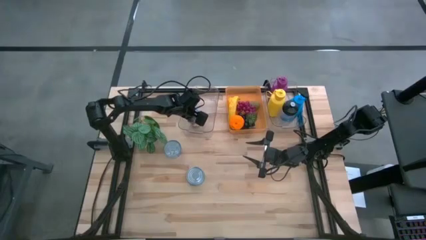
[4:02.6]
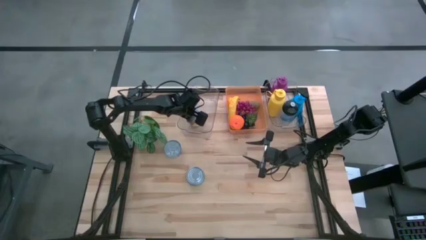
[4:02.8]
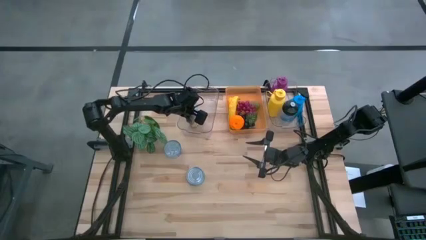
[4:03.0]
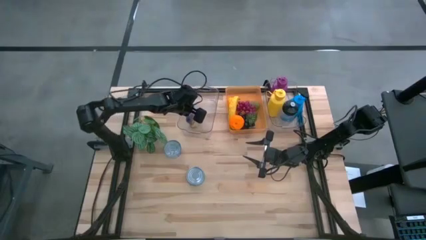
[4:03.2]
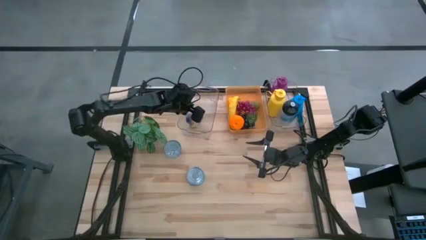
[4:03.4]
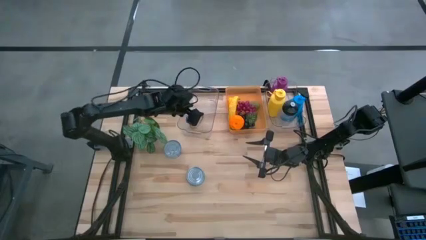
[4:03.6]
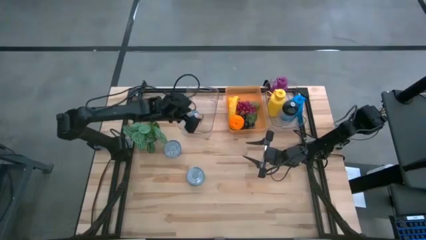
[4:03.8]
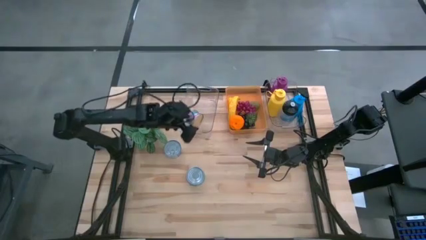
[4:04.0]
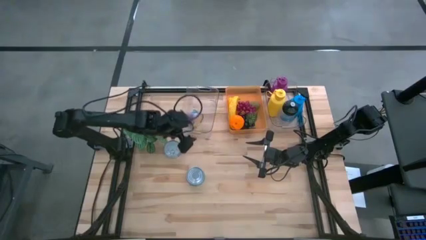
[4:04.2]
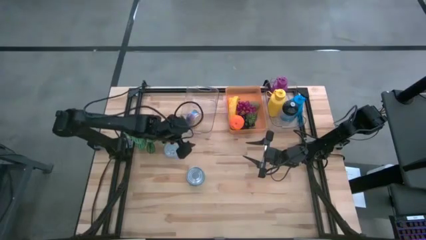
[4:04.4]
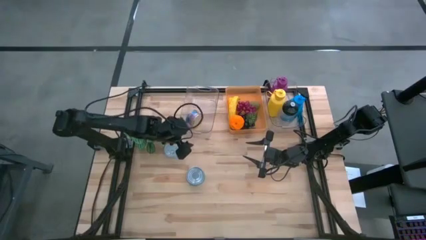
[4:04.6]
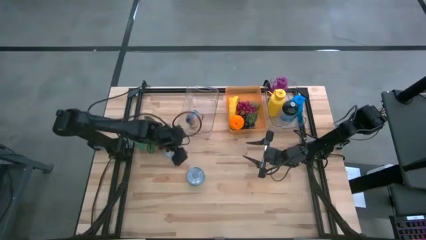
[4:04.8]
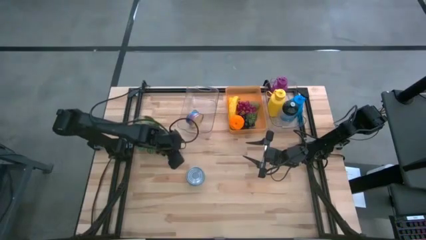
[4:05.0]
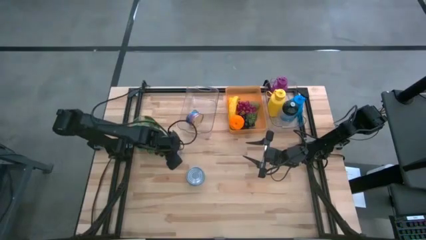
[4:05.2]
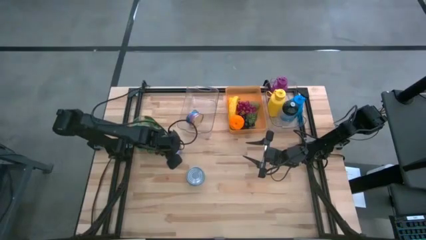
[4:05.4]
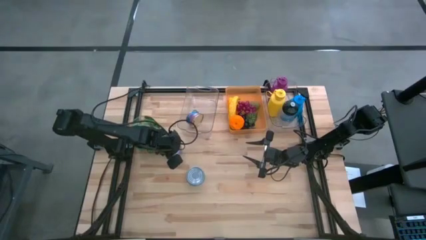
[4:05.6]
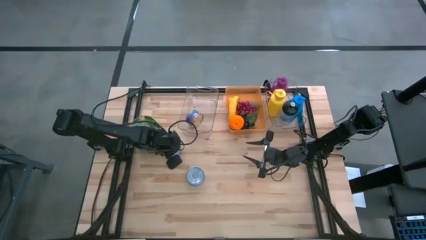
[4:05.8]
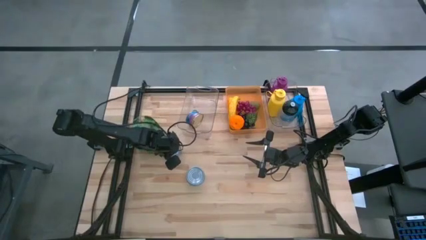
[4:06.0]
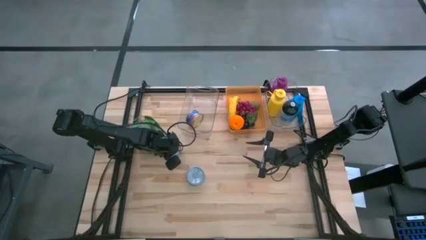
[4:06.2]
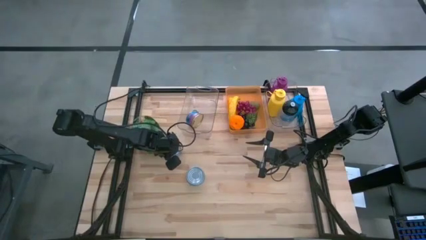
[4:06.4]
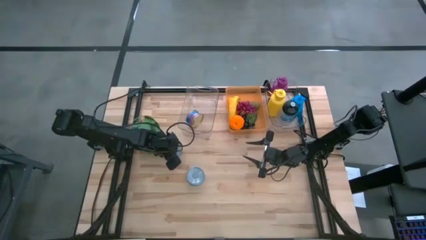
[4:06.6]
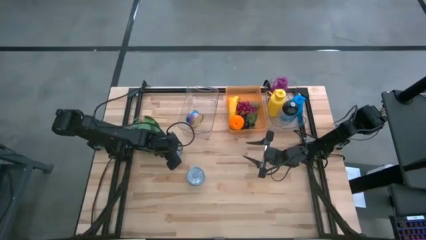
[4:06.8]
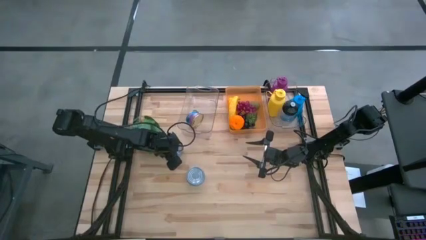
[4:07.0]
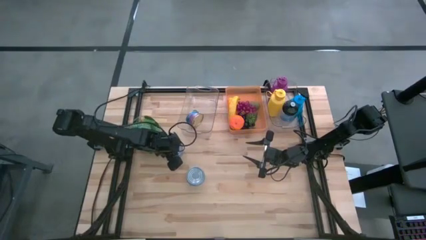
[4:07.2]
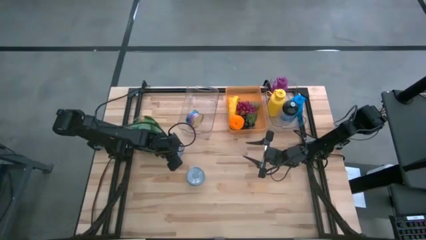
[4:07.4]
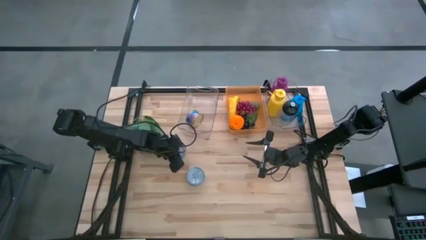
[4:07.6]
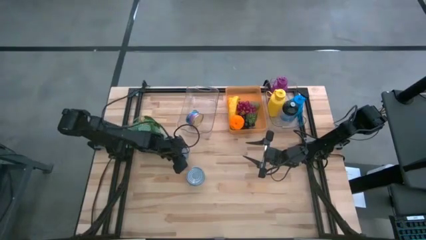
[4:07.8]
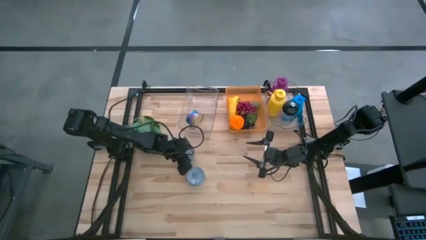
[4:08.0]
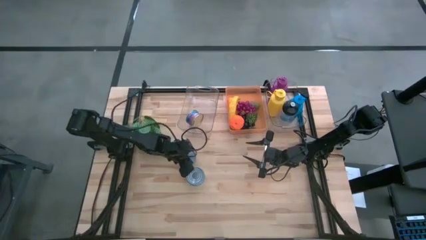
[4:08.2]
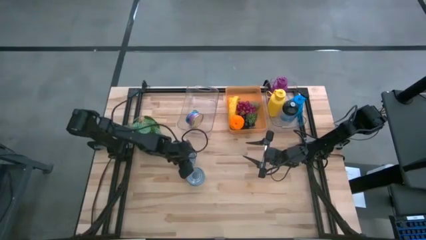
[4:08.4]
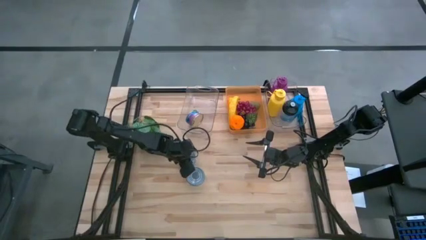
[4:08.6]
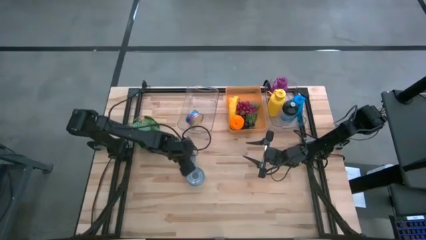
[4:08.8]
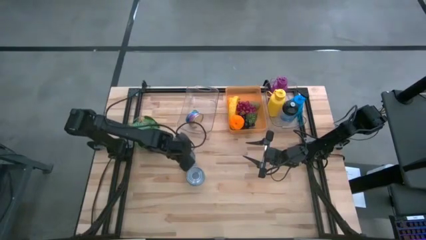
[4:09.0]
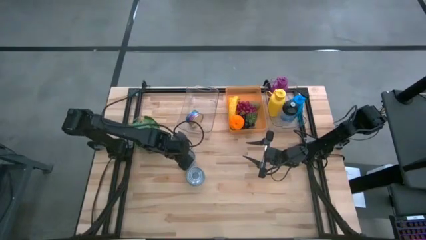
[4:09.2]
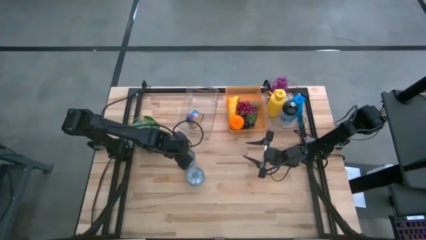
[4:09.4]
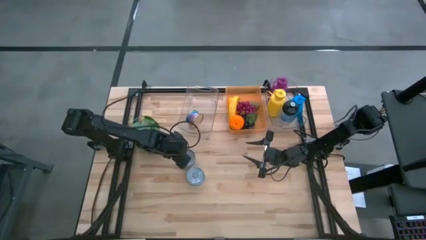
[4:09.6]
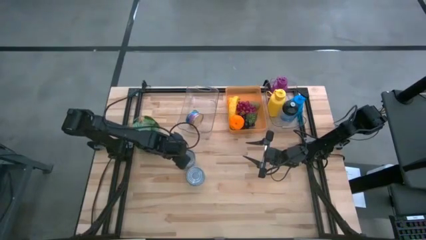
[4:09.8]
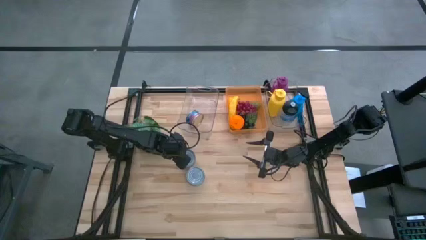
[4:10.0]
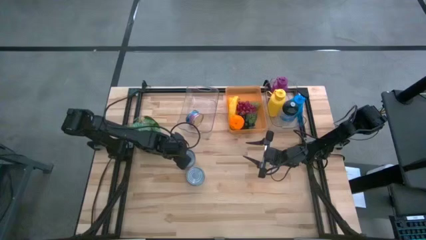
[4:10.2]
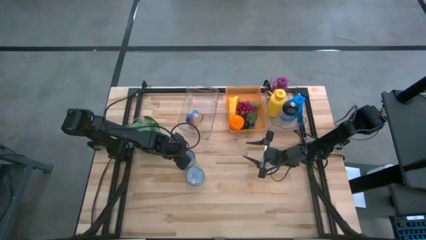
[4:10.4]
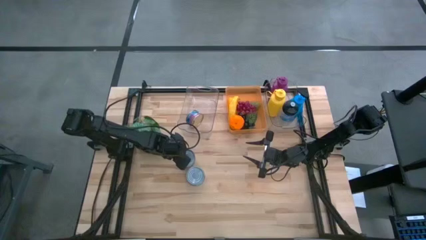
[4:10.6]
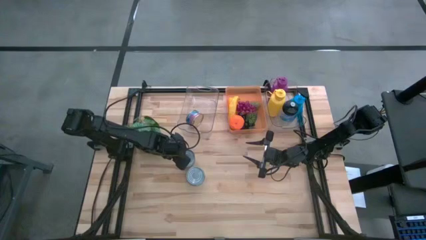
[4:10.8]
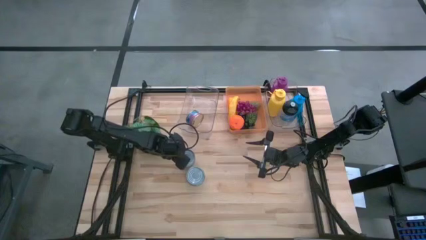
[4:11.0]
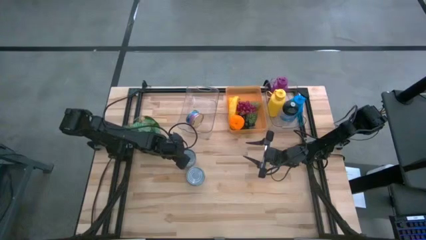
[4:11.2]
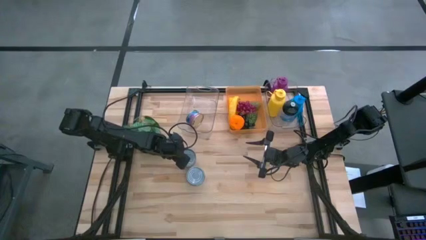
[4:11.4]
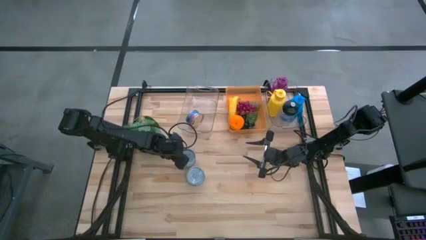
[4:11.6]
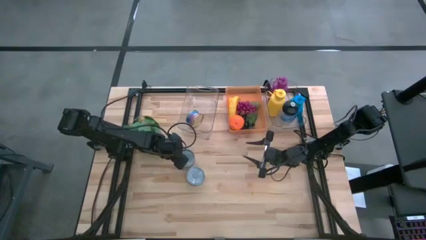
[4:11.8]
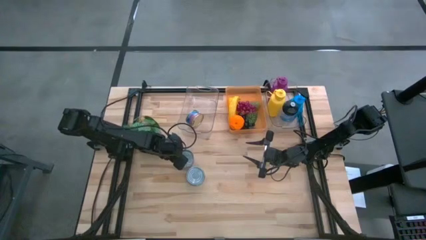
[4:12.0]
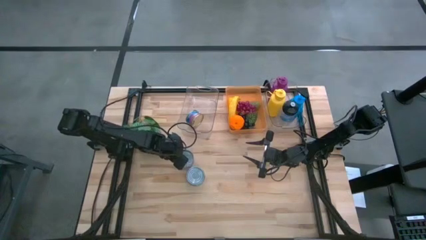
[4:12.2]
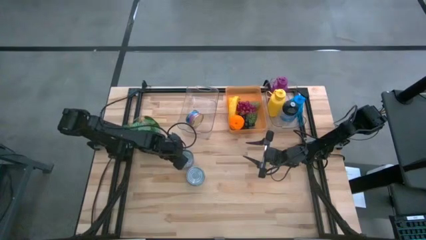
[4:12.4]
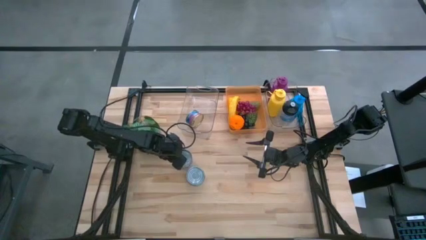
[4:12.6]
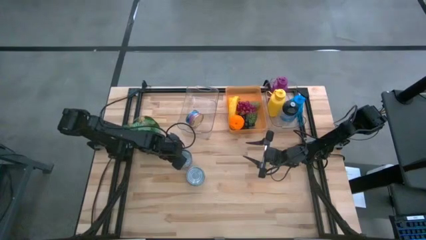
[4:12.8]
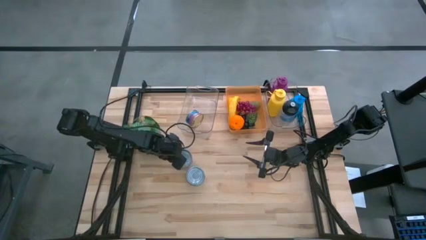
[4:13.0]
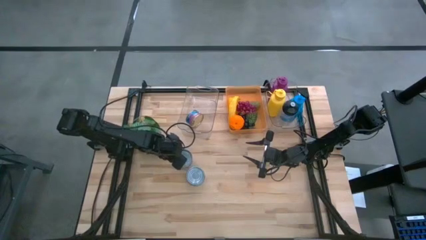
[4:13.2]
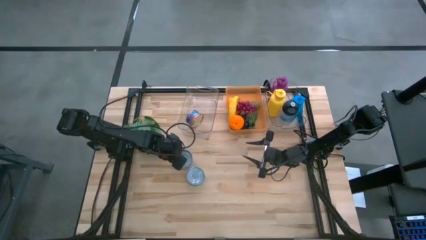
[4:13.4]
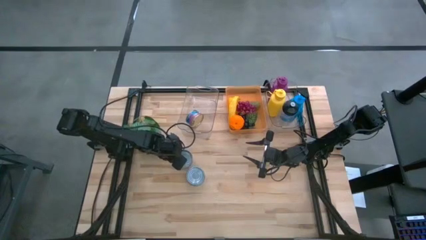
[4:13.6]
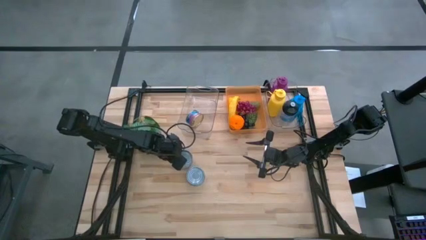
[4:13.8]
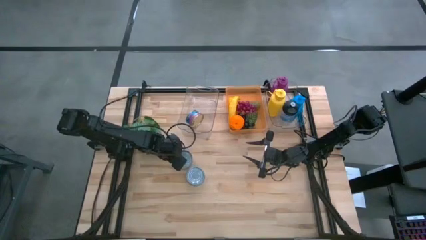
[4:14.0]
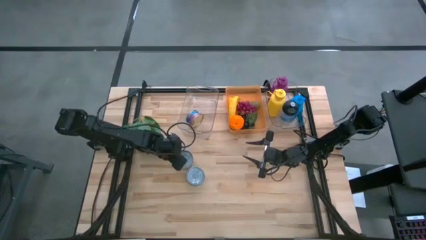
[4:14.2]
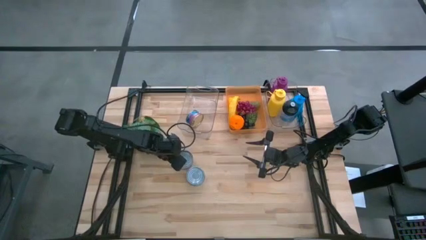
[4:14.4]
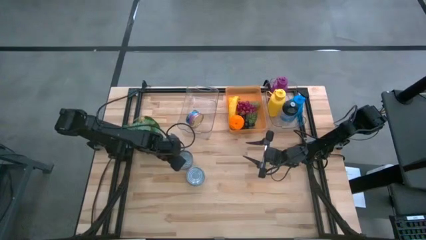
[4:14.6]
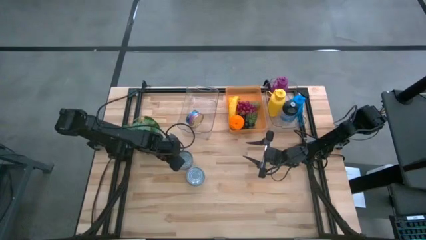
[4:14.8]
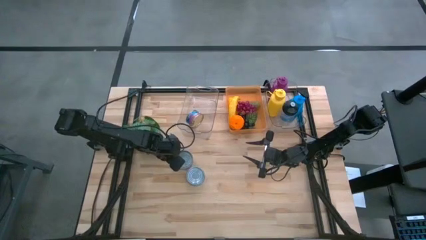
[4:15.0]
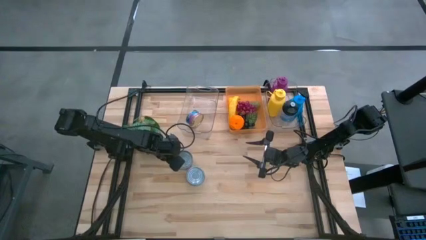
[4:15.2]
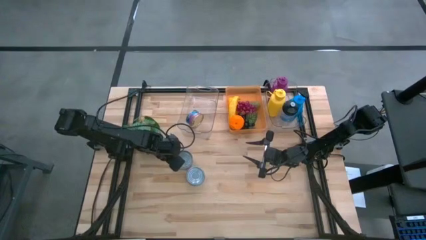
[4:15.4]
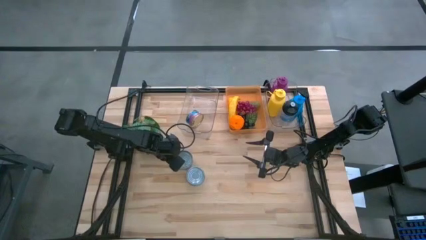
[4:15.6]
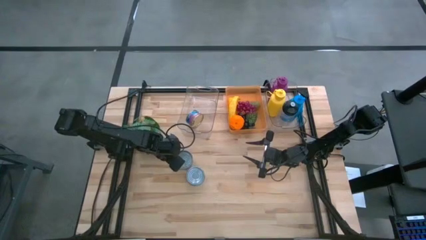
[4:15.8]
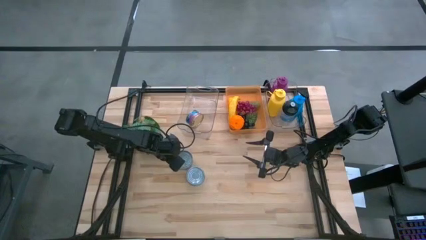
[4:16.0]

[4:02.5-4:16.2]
Task: Pick & Place Food Item
Put the blue can into the left transparent bin

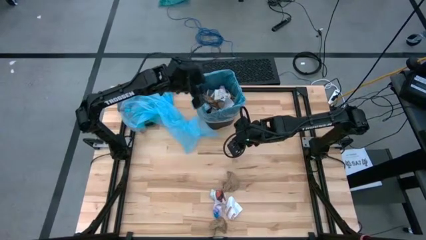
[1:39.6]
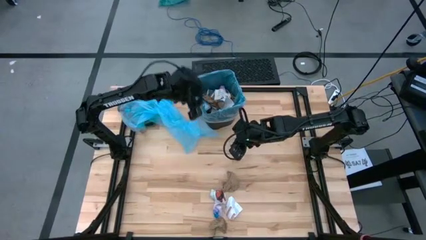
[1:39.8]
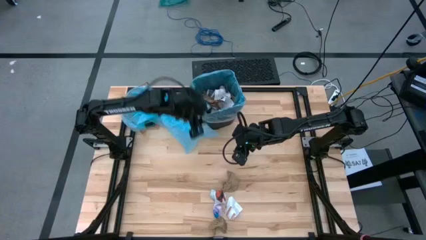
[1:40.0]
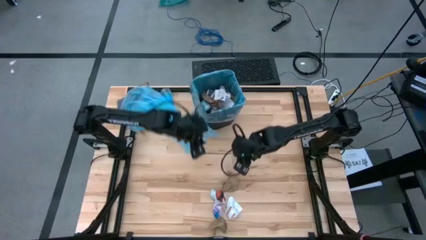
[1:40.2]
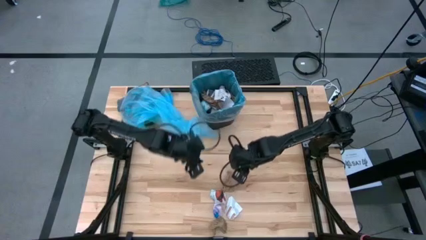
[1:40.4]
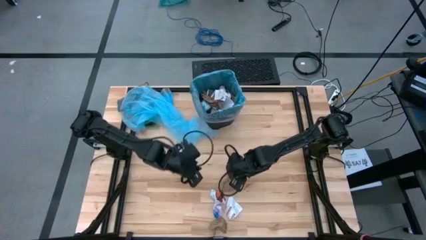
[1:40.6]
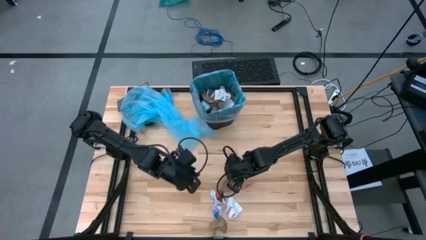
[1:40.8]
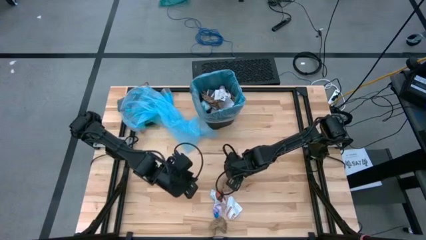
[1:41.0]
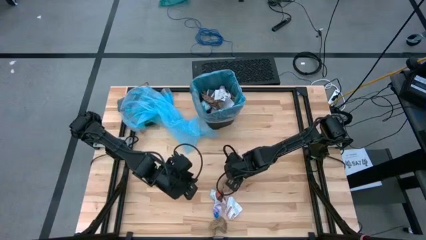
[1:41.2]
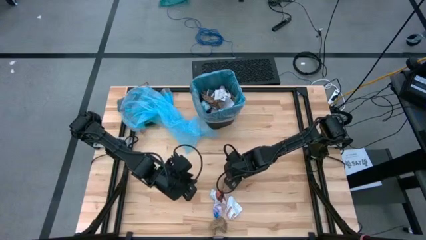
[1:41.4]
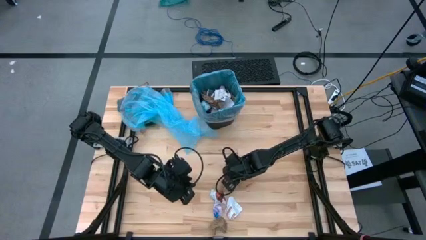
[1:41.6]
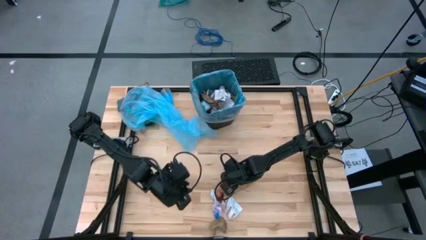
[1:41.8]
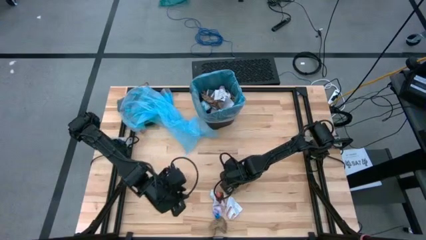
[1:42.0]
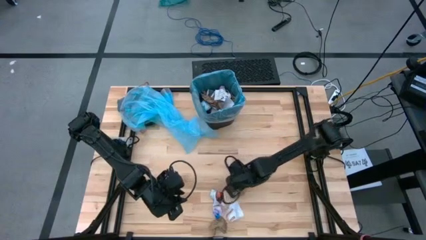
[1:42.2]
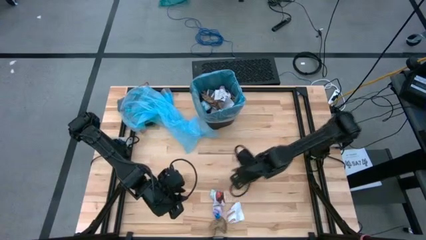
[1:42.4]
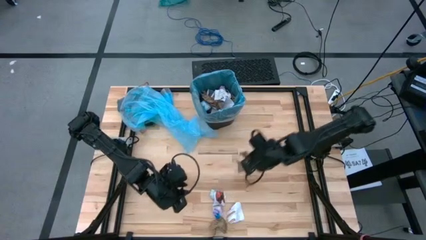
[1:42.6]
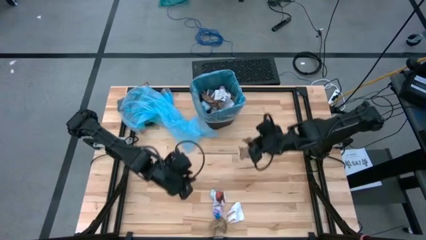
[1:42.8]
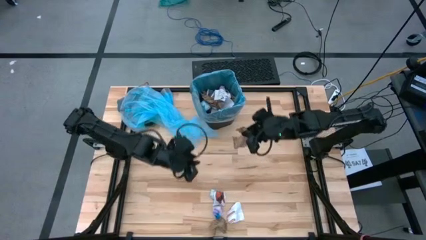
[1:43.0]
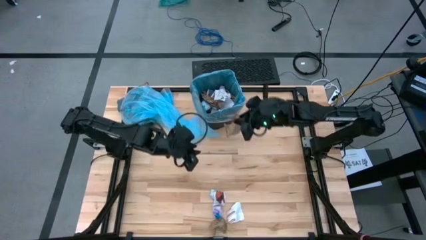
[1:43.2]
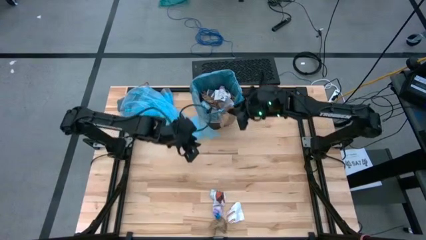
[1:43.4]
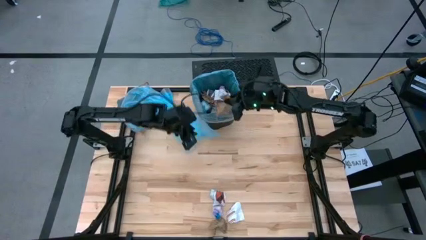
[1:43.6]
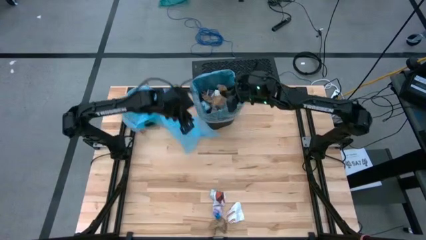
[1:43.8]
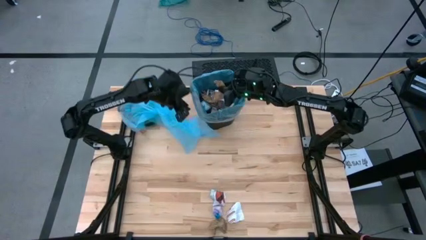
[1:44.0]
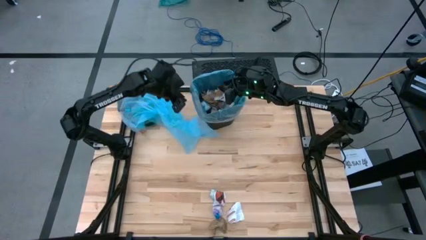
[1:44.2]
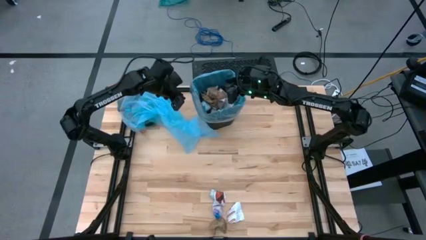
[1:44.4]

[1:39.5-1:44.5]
Task: place trash/remove bag and relplace
Put the brown paper into the trash bin
